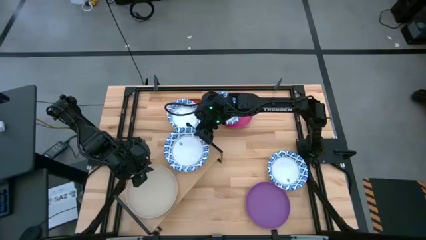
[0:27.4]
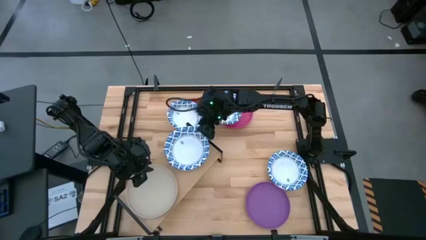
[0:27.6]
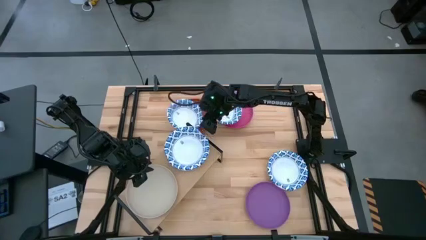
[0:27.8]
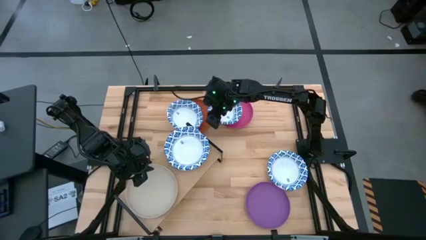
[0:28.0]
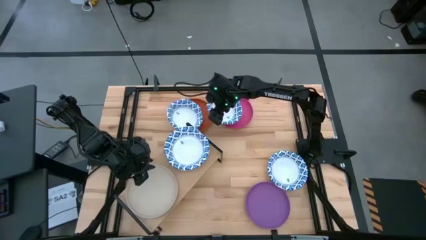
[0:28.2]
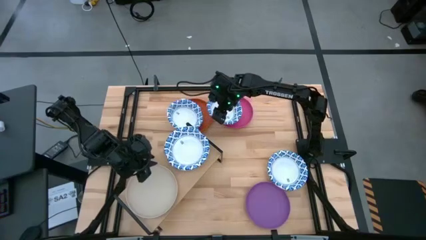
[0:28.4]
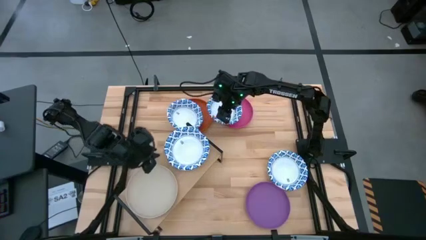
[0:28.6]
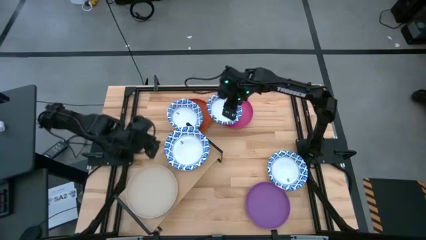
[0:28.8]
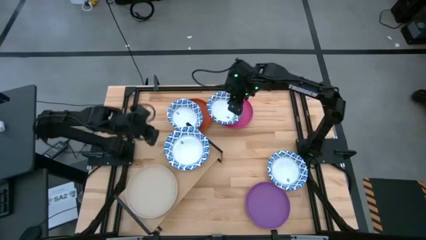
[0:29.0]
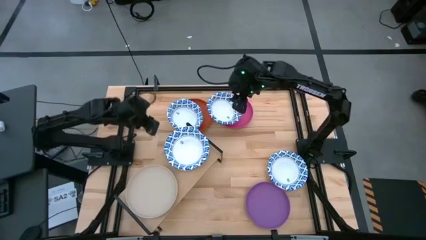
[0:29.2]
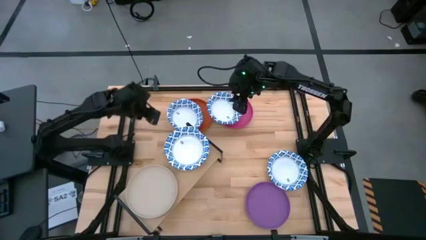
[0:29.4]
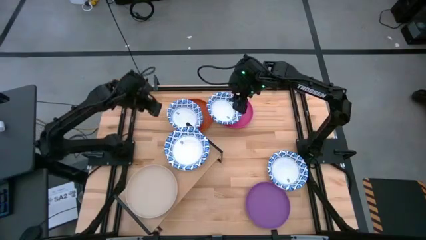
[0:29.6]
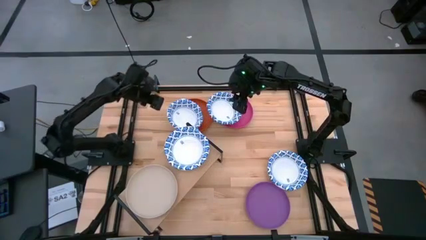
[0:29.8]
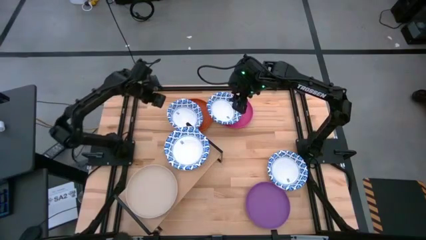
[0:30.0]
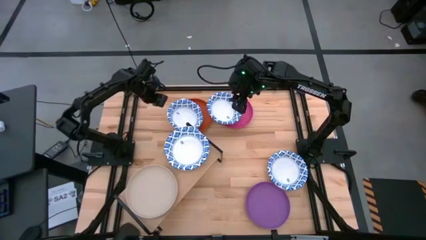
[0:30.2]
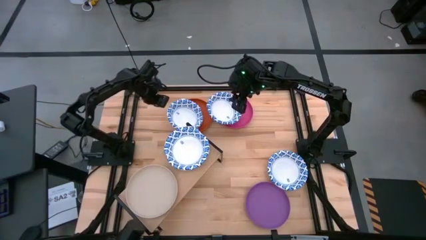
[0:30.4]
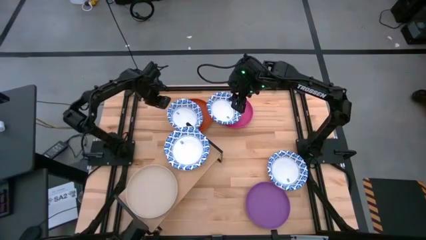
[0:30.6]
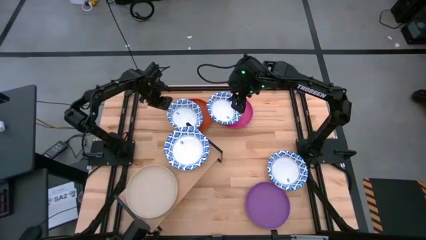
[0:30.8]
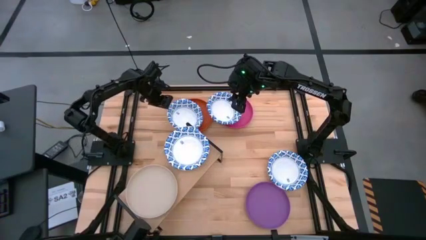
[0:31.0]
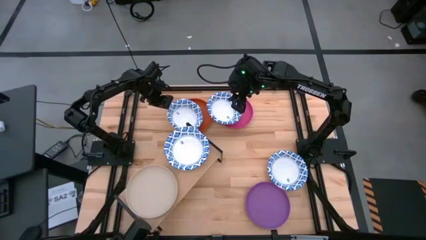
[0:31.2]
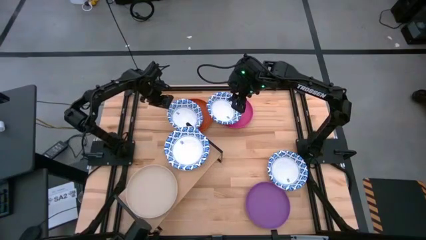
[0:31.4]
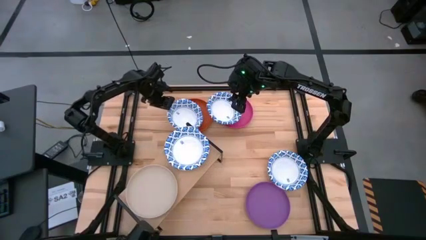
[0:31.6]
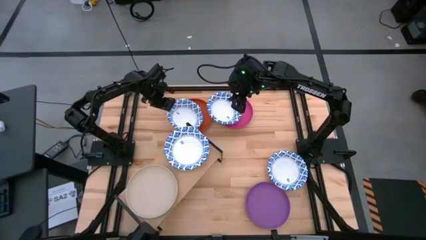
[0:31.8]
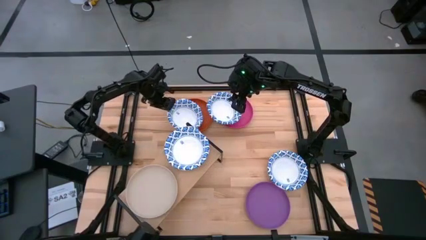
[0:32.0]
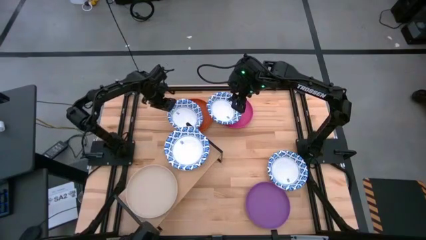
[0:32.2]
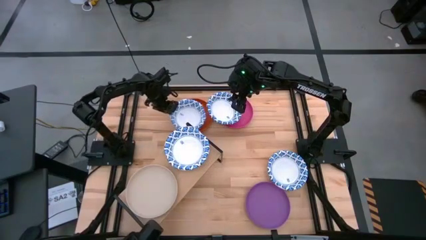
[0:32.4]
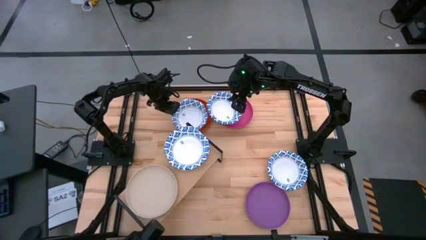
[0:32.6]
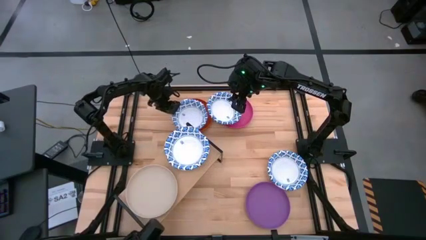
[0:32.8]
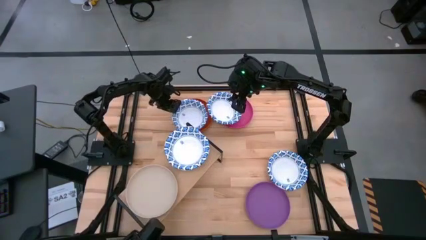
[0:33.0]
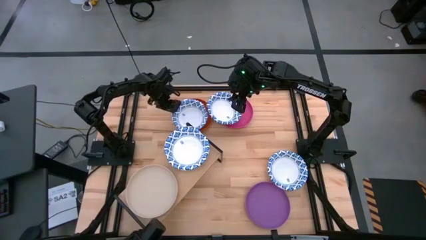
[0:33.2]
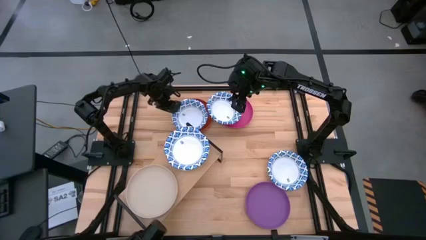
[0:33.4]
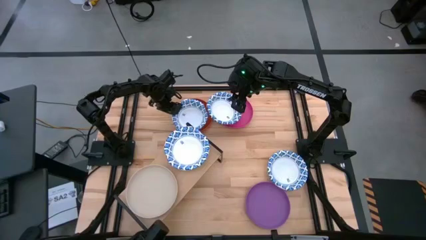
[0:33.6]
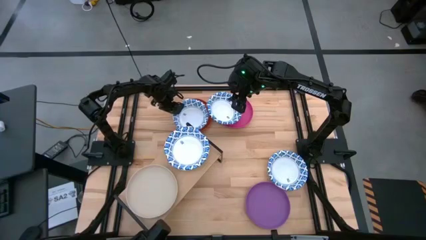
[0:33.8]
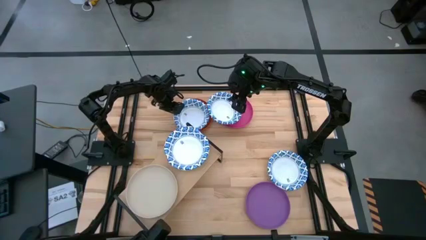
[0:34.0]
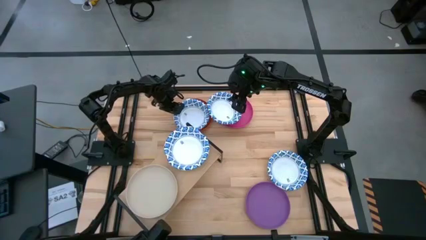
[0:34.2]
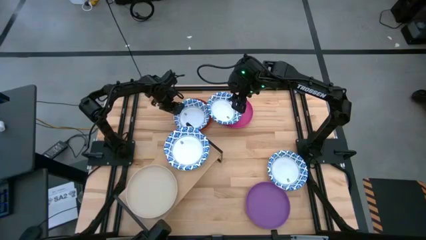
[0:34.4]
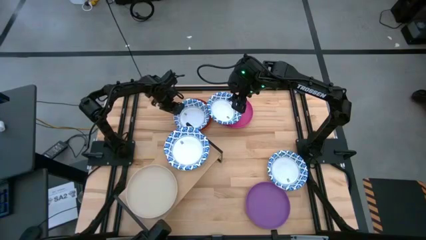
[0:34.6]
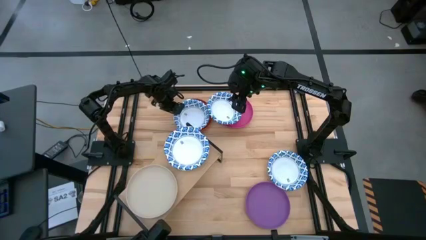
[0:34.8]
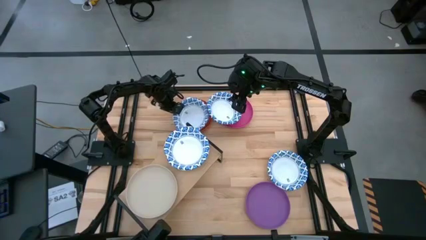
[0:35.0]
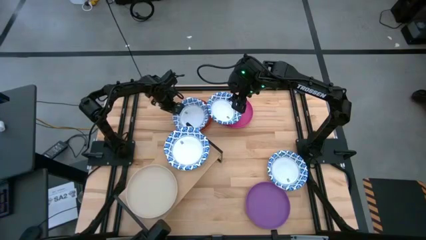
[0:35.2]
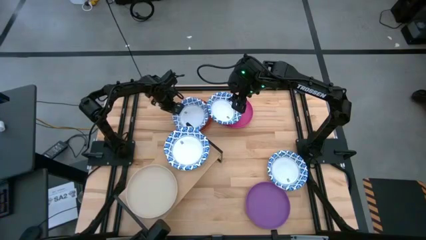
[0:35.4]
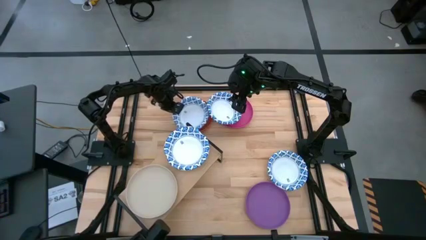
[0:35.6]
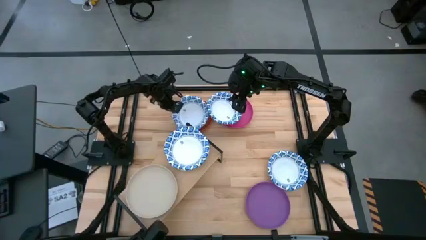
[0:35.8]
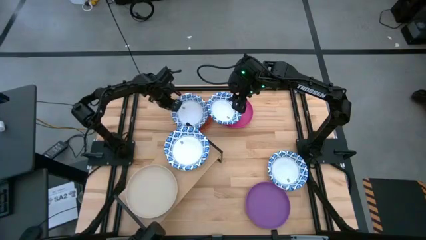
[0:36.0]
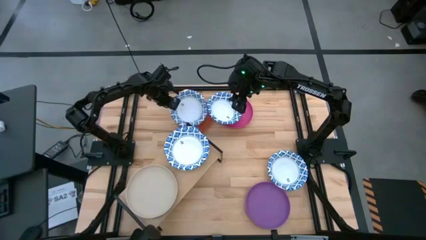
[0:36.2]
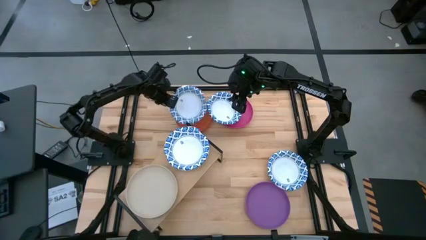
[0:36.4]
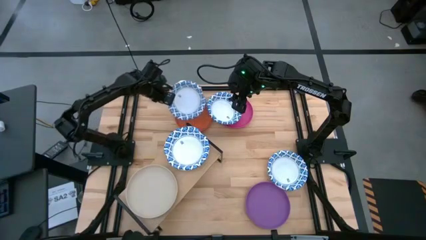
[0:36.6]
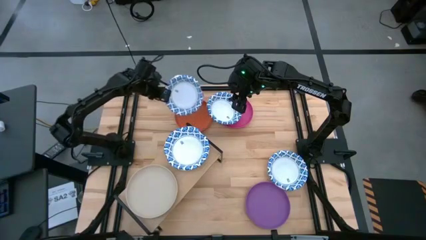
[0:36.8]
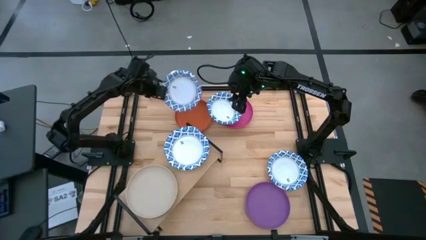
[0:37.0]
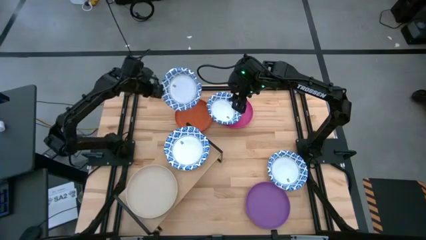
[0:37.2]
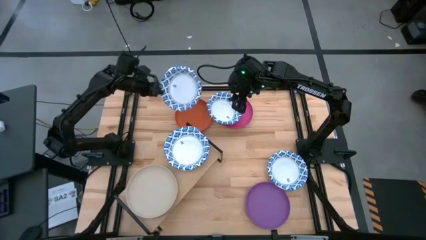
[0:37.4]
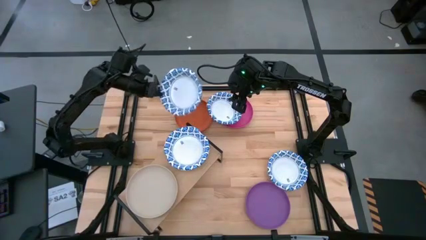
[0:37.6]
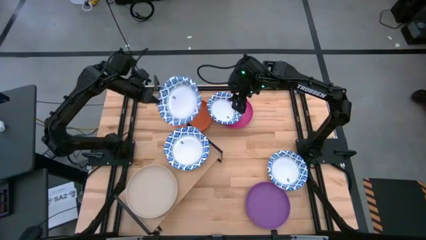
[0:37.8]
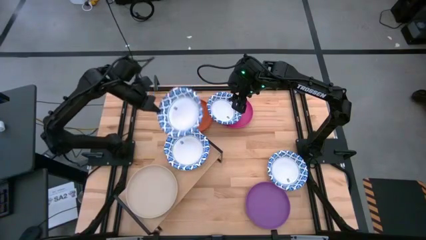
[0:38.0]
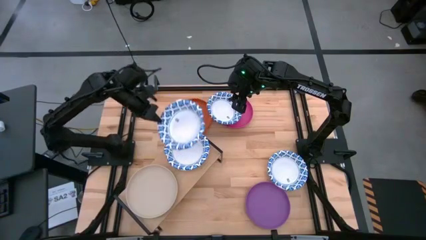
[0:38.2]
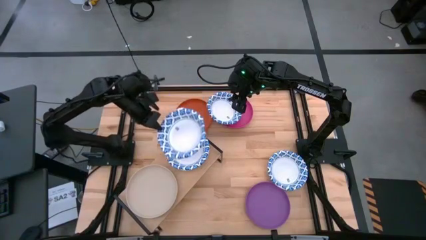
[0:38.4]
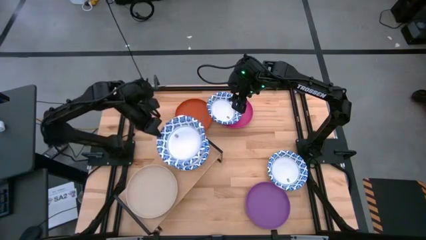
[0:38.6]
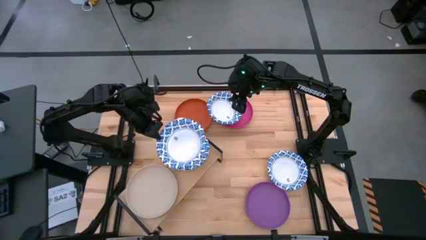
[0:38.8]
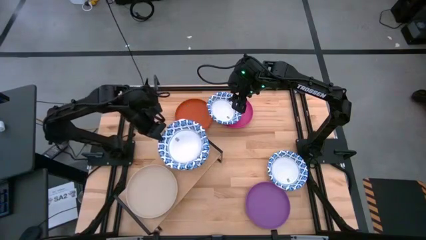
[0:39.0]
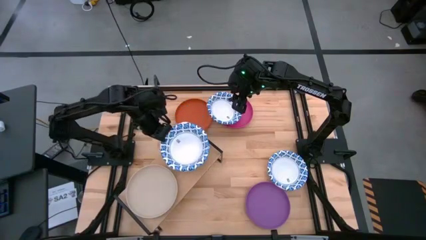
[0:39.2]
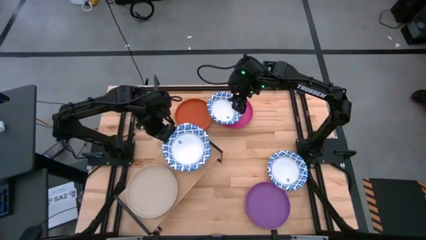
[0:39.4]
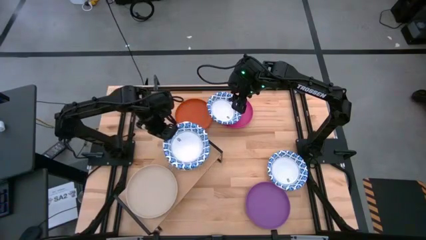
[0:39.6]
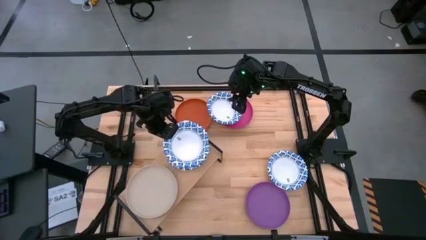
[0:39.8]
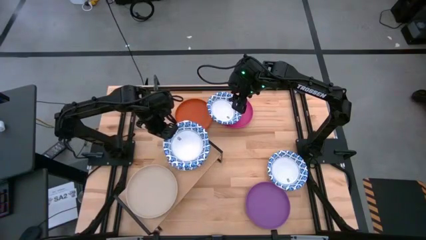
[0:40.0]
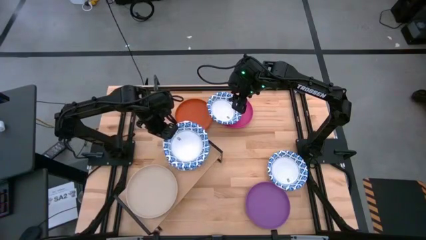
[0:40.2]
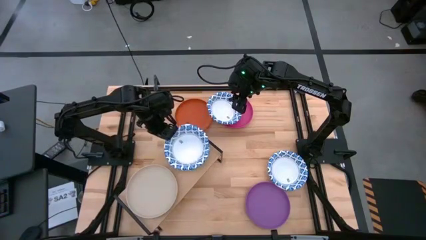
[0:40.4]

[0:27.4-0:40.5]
Task: Place and stack plates onto a shelf
Stack the white bowl on top of the other white bowl on the shelf

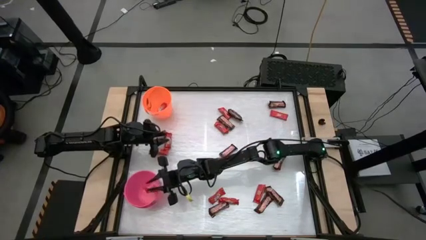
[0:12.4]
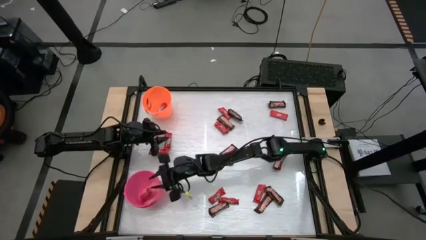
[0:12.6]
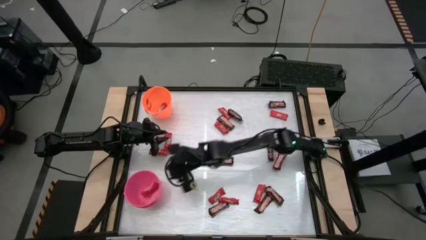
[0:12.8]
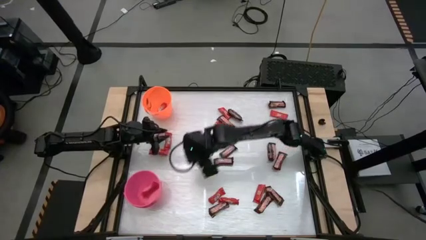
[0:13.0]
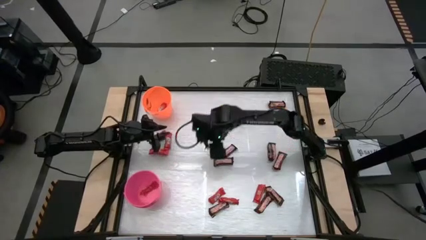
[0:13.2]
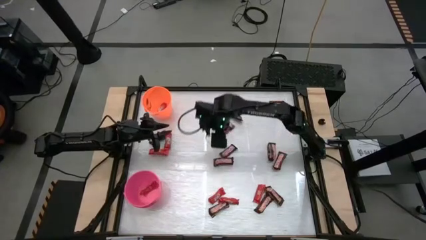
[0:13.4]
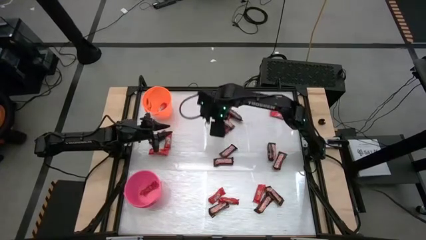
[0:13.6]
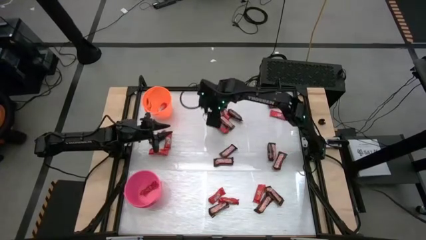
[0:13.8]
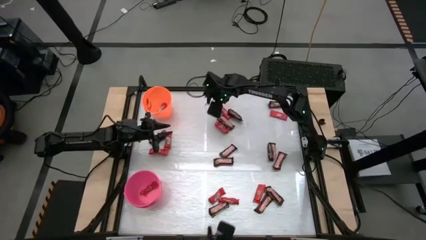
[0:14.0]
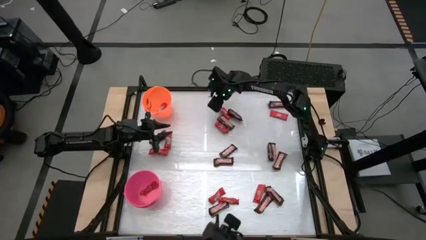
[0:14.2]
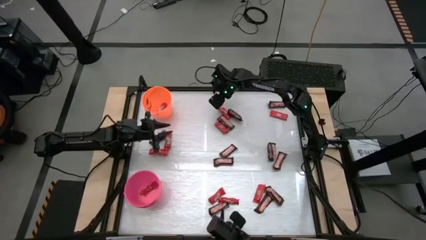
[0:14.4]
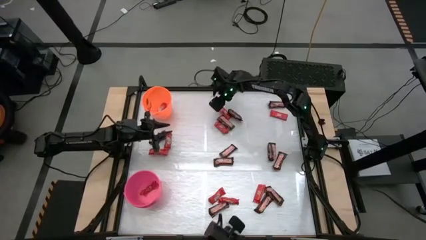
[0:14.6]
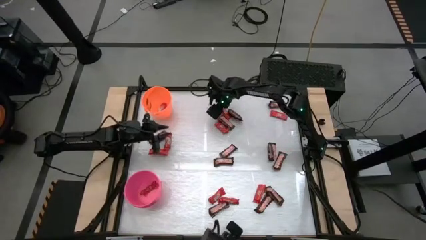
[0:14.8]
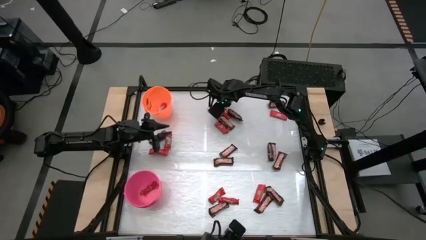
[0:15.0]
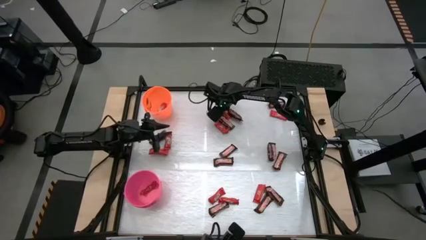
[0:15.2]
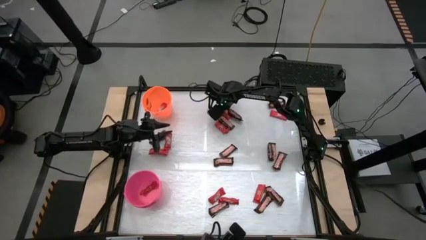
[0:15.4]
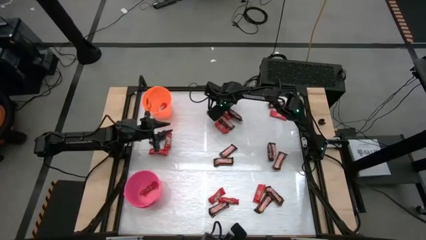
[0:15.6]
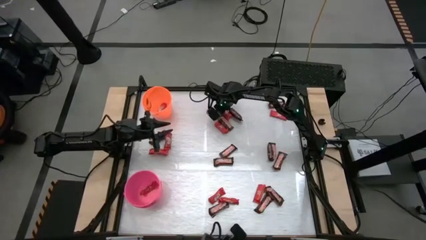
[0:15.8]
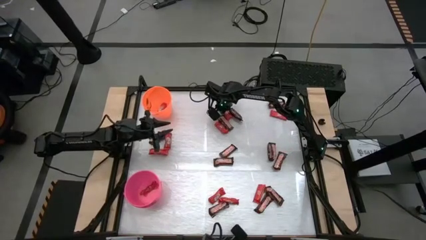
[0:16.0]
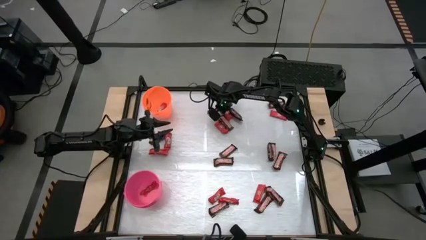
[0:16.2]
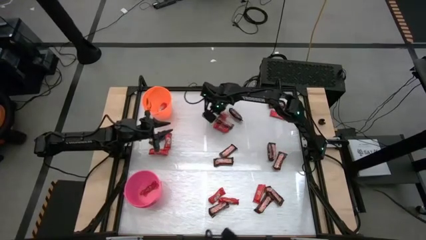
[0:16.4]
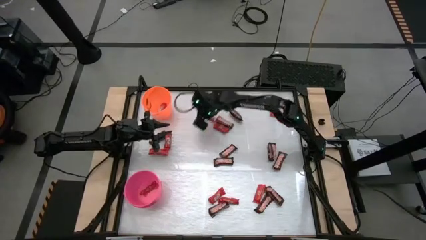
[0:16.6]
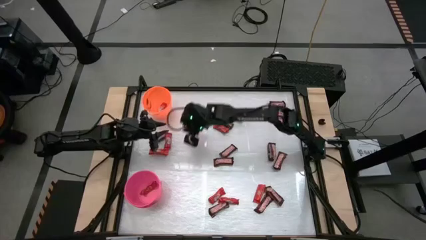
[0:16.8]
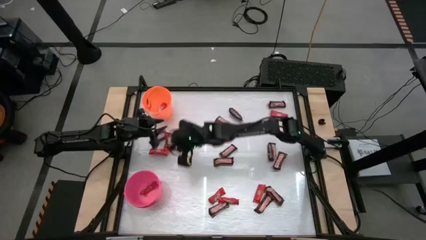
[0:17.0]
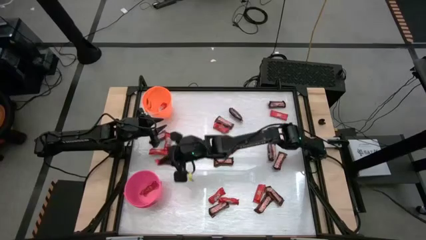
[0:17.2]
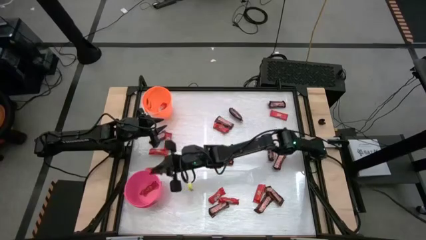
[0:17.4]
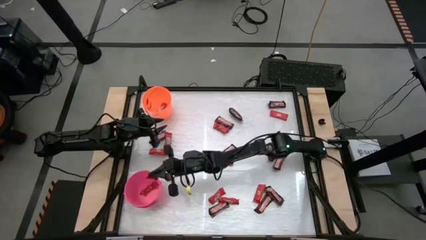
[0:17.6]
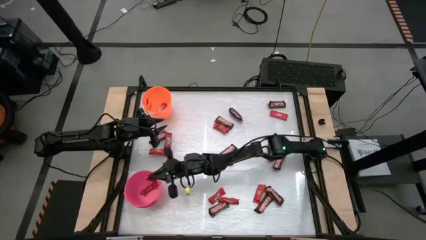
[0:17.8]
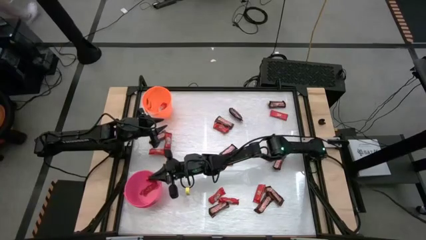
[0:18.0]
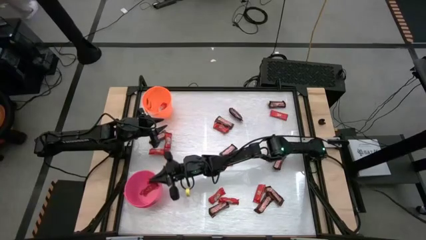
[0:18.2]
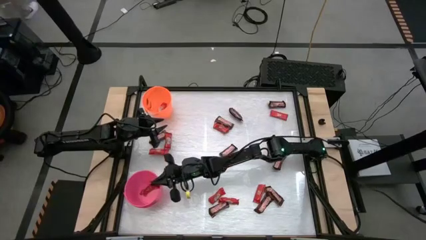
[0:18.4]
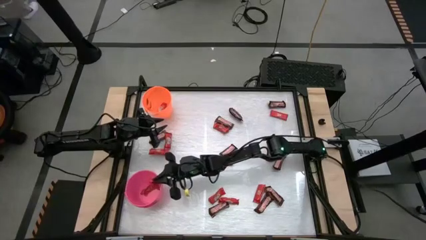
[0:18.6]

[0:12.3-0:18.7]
Task: Sort candy by brand, put in halloween buckets
Put the red chocolate bar into the pink bucket
